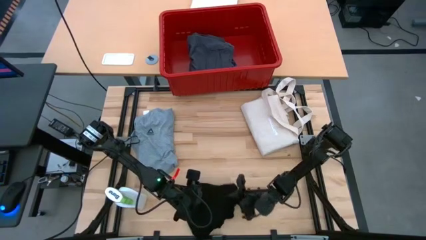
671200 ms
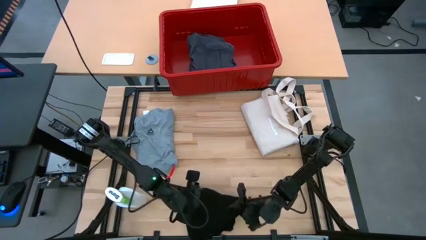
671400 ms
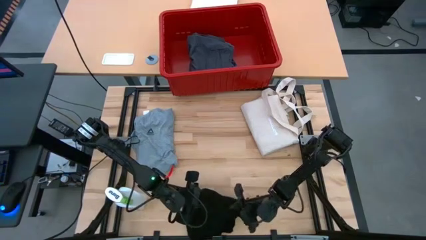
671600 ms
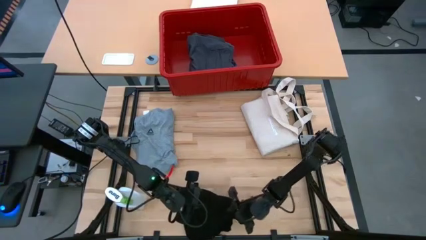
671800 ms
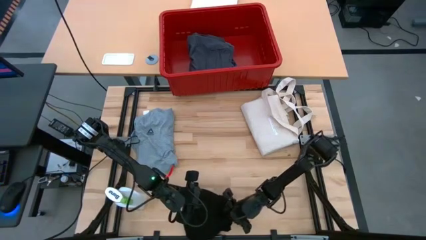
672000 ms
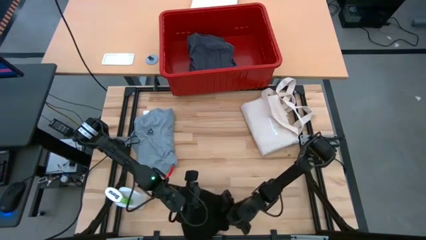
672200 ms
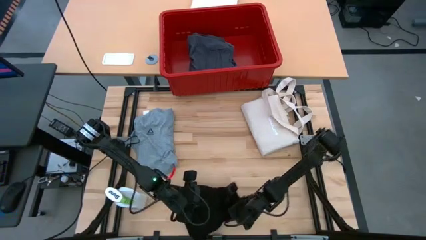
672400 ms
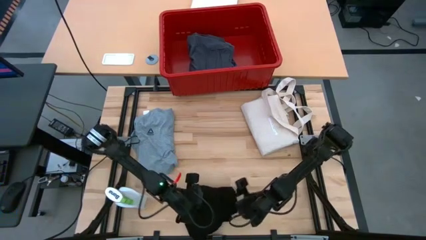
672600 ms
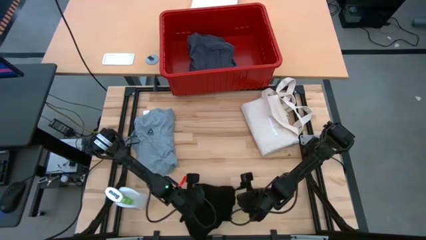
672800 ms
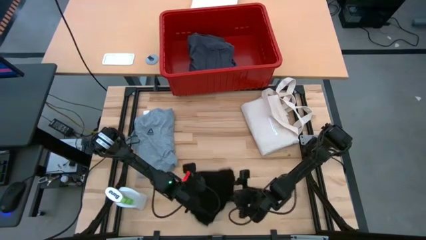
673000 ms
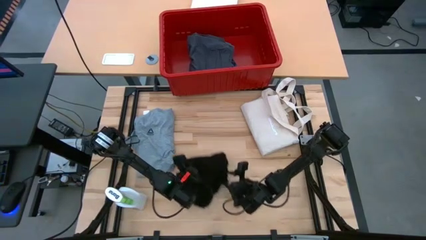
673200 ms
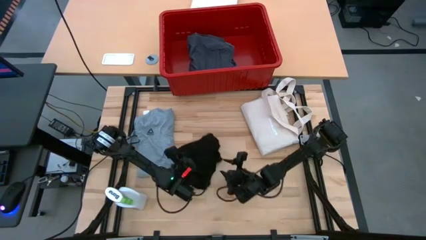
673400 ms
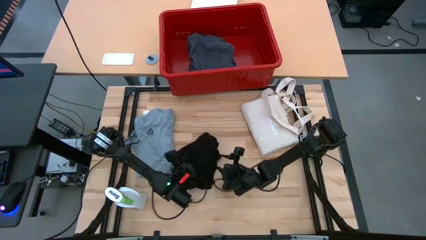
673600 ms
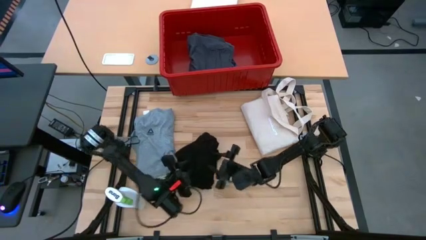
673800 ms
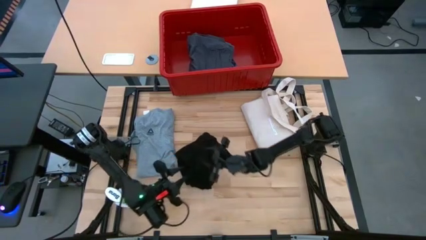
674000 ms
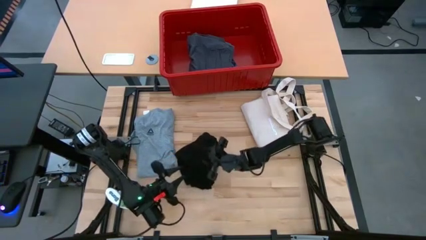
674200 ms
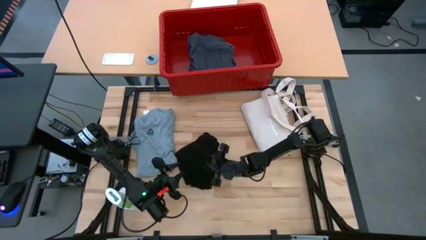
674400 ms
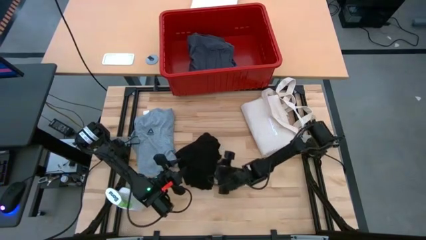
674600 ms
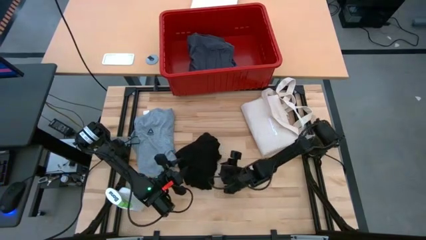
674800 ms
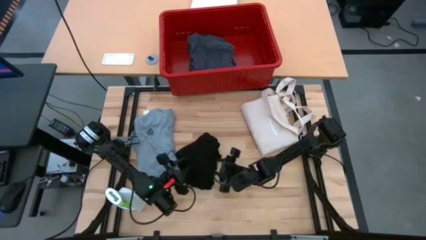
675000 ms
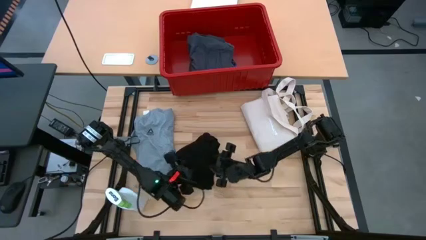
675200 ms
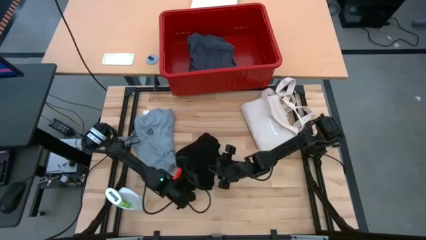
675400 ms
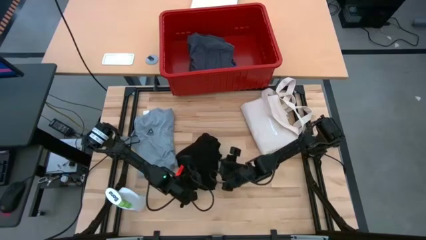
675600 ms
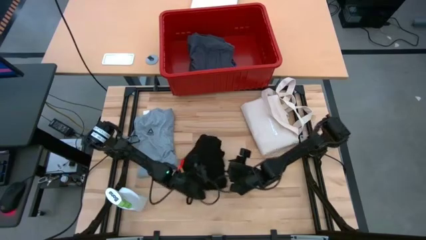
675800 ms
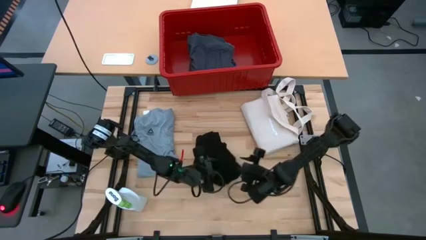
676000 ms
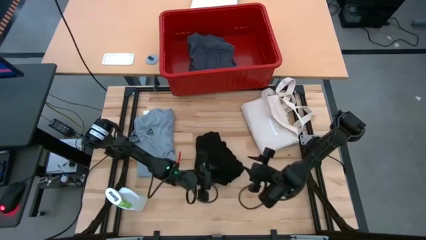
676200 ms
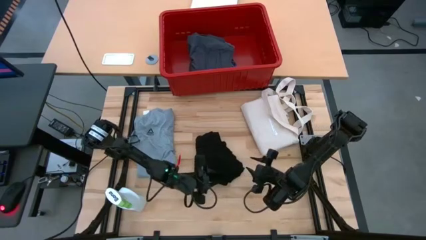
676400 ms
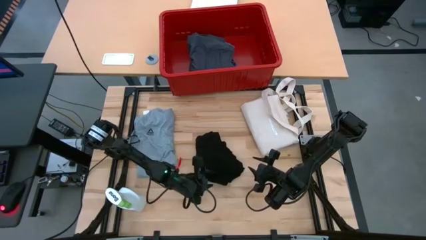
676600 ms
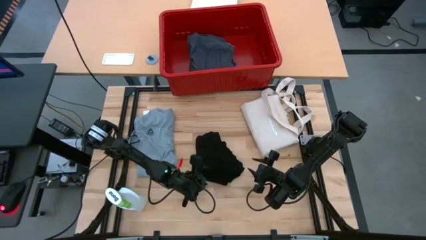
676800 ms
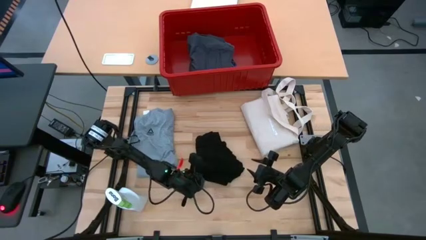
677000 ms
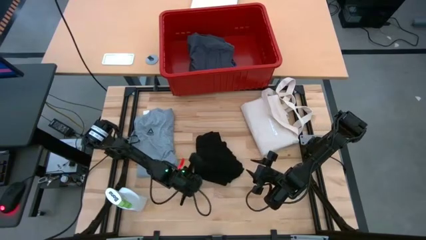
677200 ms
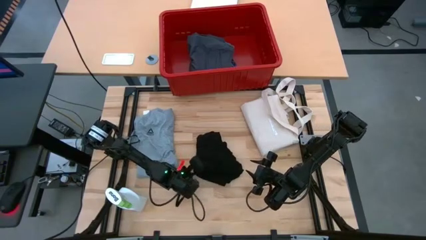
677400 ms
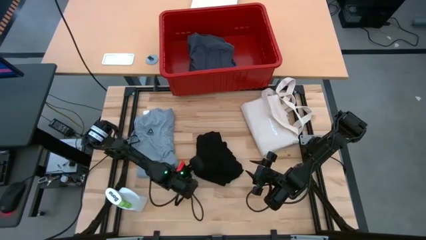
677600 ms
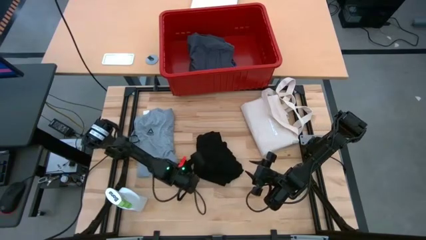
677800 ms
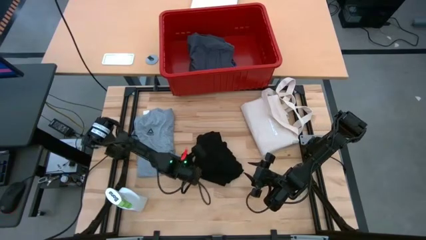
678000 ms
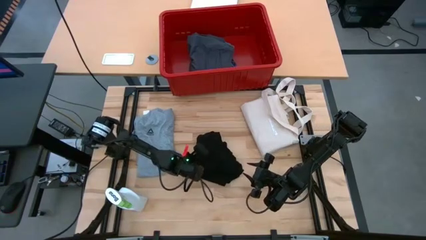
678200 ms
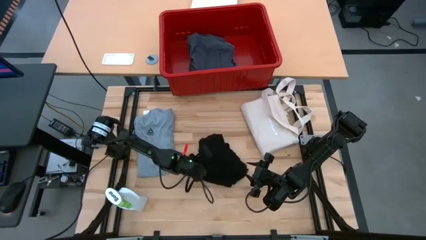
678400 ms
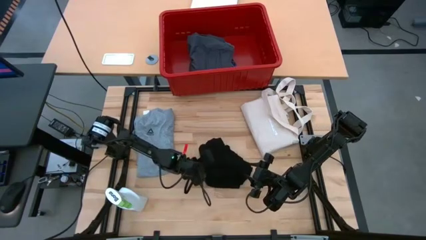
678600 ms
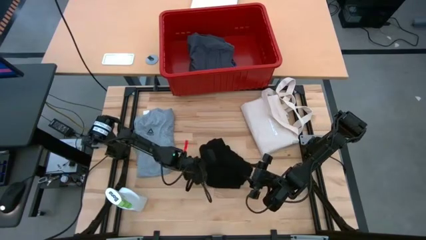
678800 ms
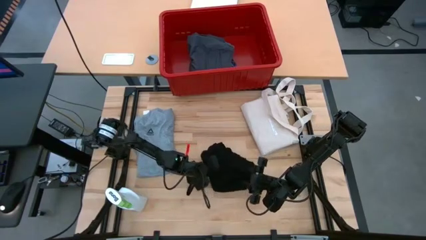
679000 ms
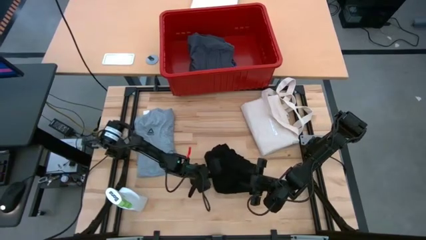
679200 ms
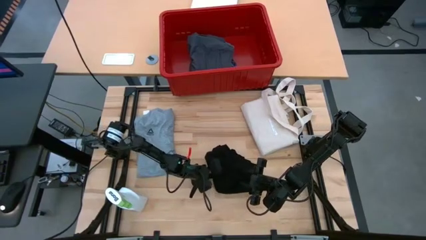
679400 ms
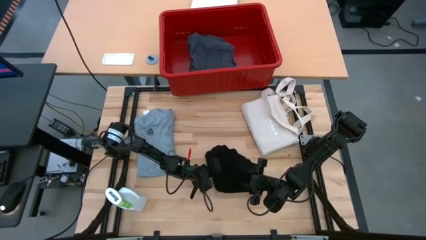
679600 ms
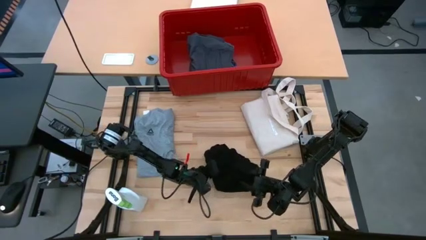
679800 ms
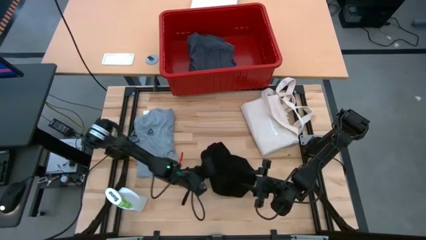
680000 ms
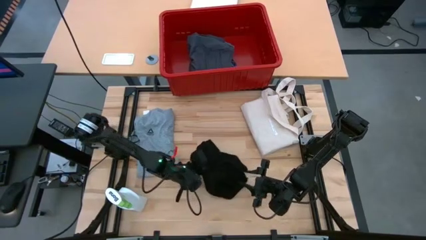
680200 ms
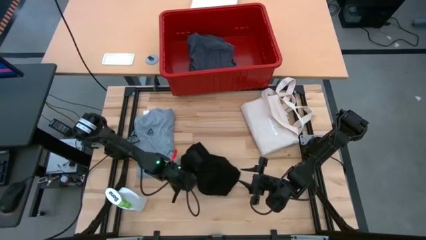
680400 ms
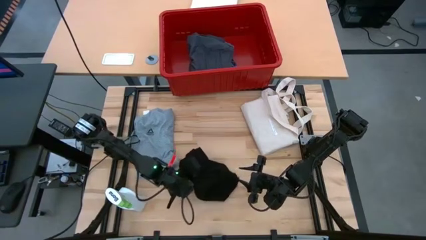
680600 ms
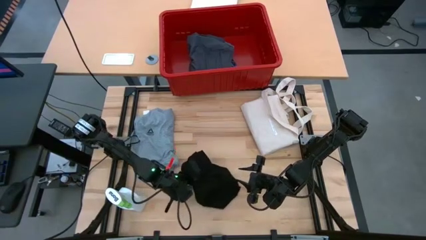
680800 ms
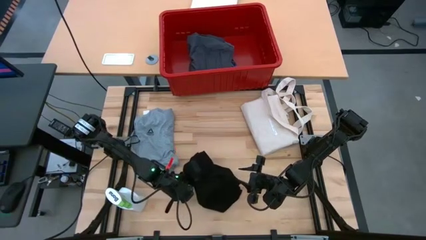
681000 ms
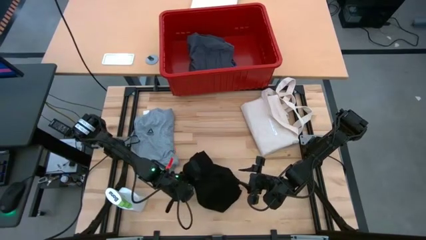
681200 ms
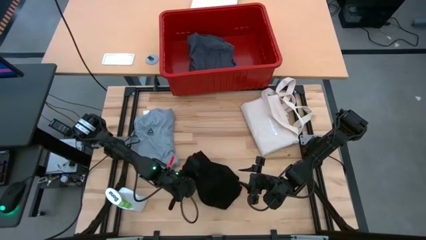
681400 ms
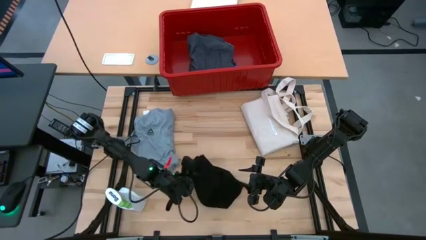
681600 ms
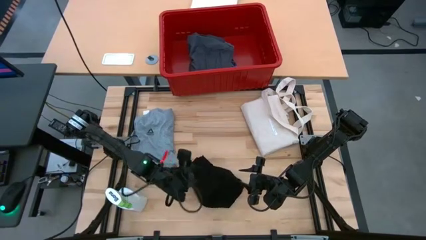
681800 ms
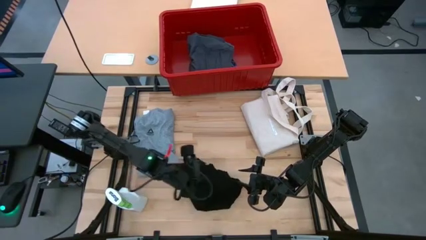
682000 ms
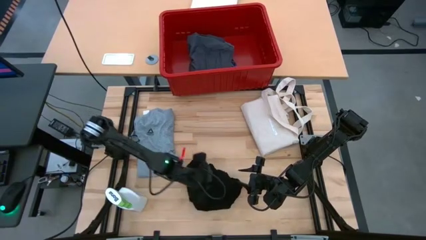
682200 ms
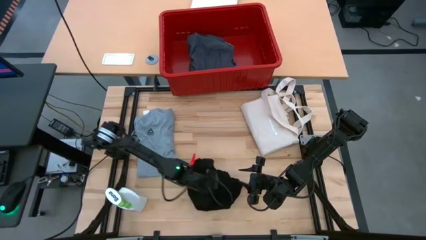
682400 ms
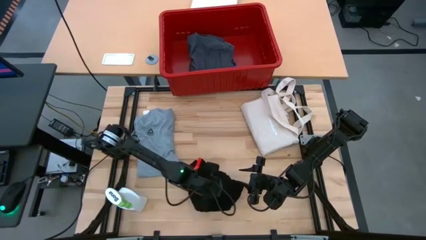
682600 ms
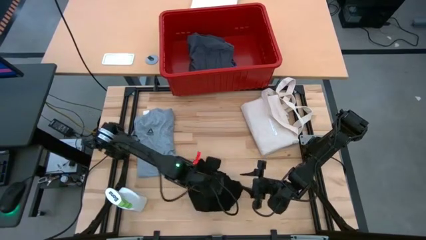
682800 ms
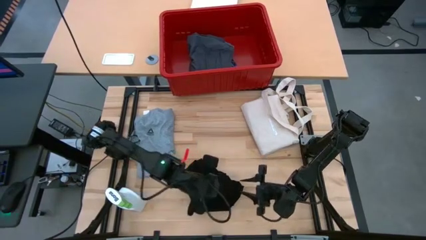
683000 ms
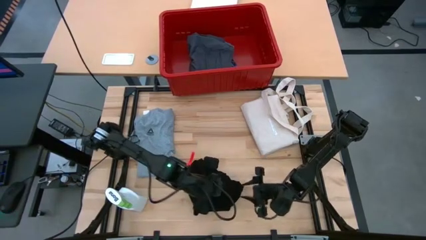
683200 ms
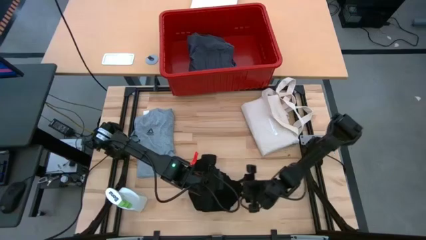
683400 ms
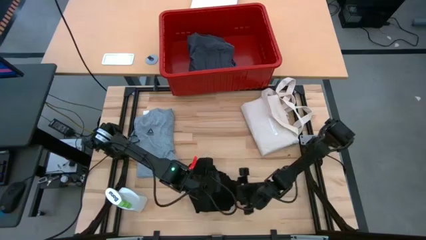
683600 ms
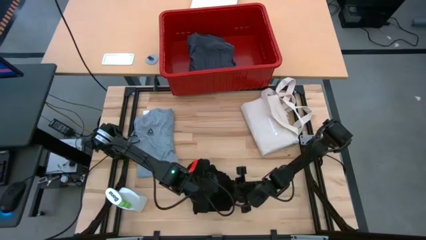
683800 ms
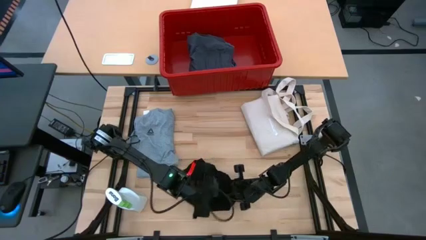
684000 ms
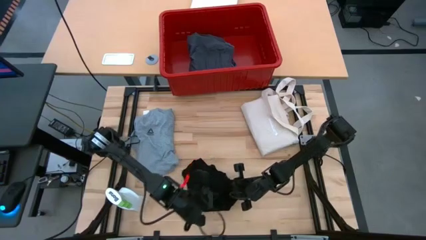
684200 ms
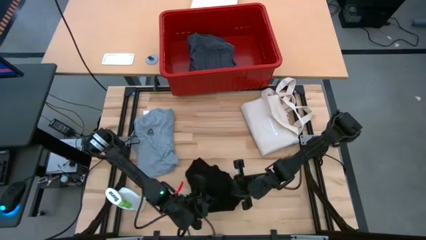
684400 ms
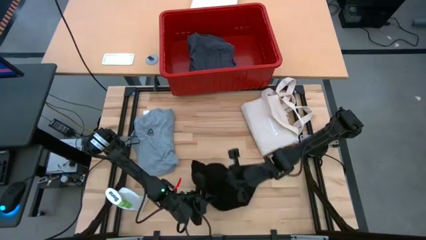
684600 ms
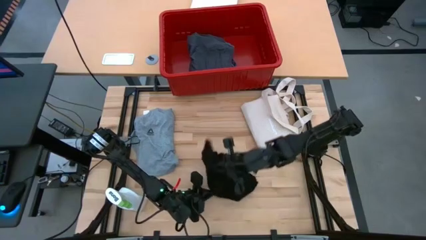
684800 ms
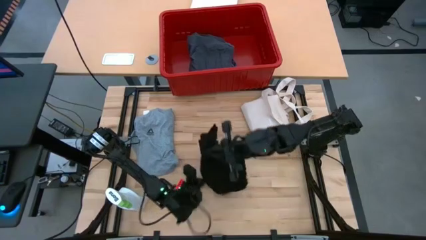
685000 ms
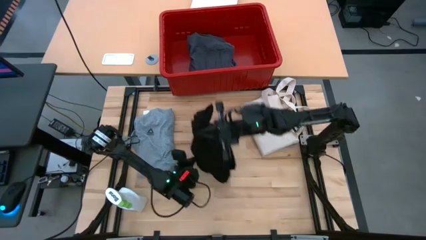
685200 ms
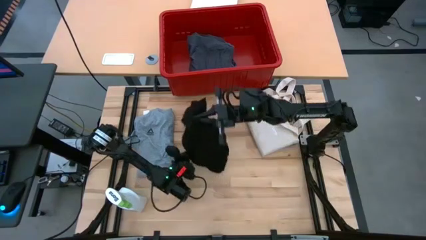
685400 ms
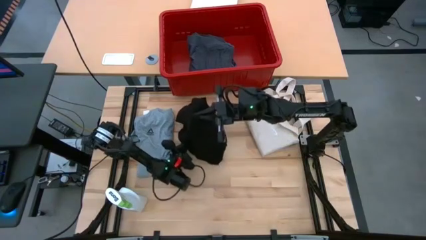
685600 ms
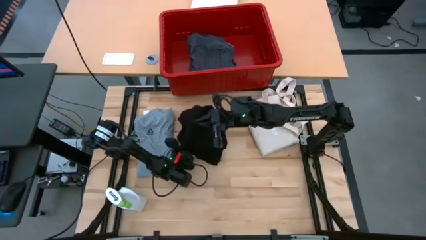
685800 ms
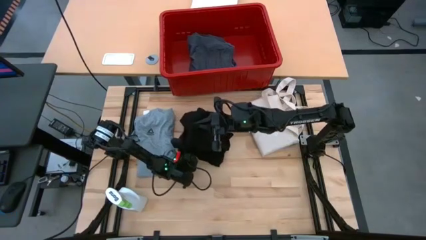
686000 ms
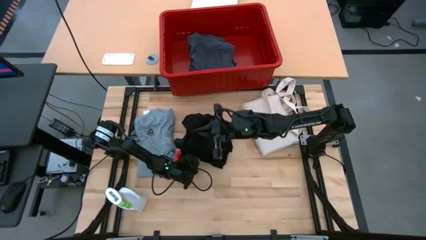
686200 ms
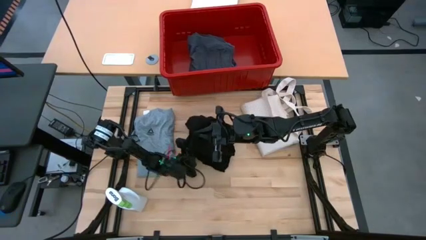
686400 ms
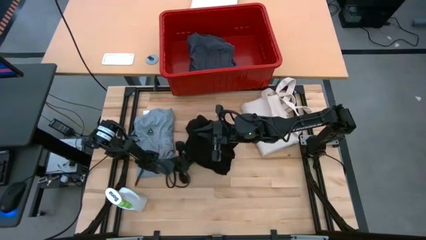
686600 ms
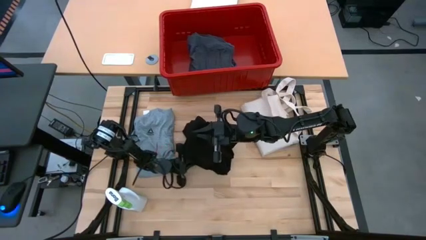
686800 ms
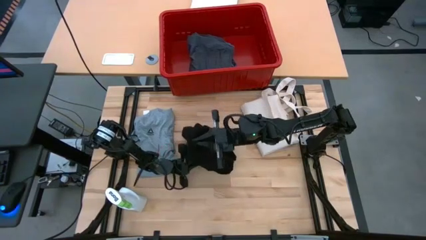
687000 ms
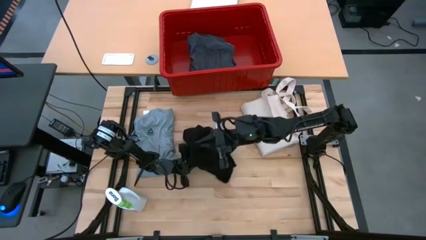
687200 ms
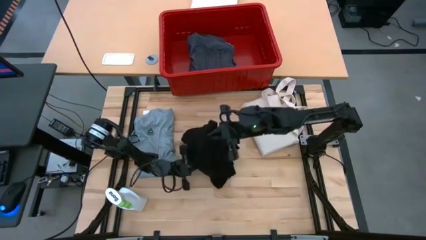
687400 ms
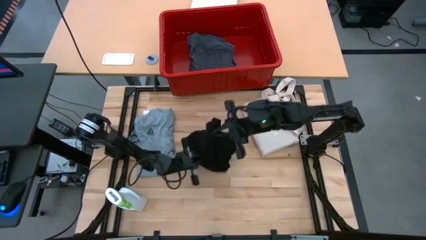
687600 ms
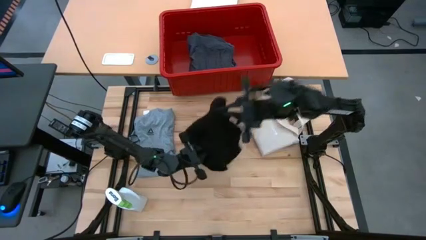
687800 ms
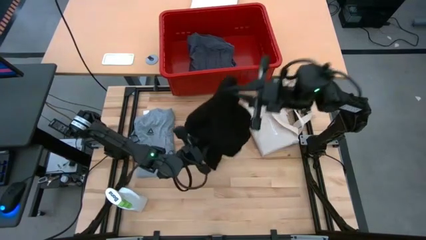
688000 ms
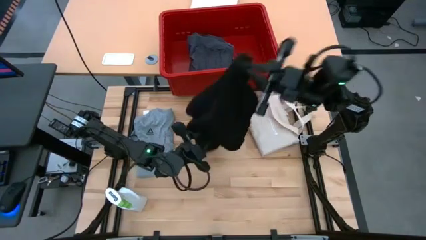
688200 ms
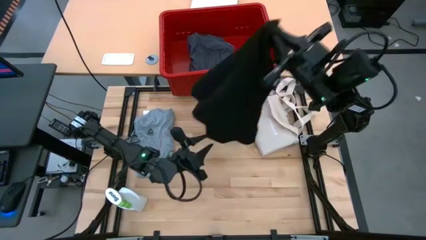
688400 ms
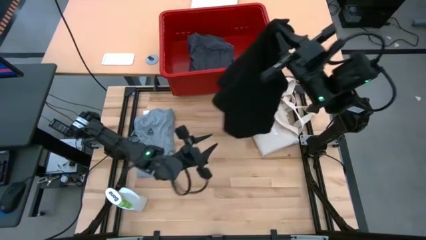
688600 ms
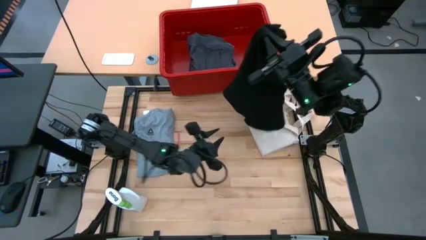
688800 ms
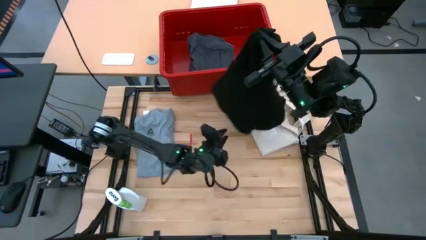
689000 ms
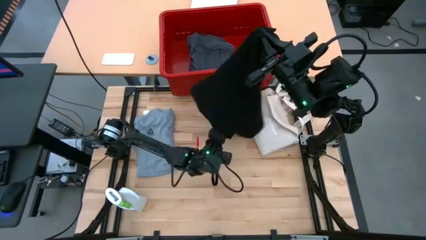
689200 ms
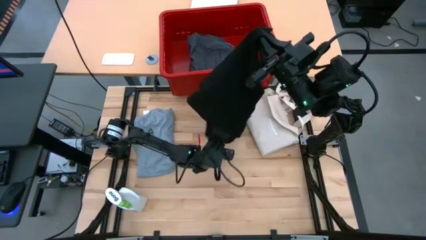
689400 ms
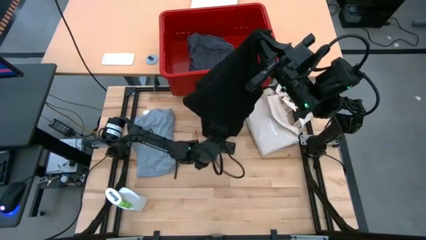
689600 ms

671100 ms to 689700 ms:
Task: Fold Laundry from Bin
Fold the black shirt
